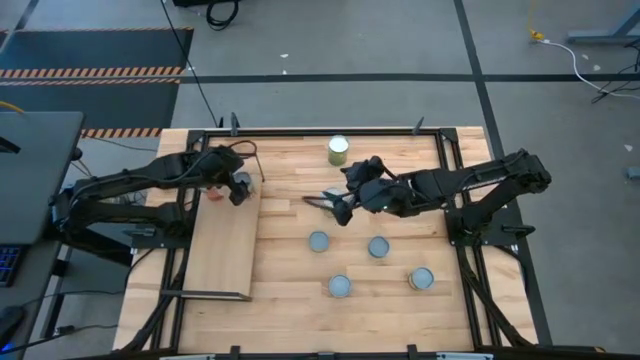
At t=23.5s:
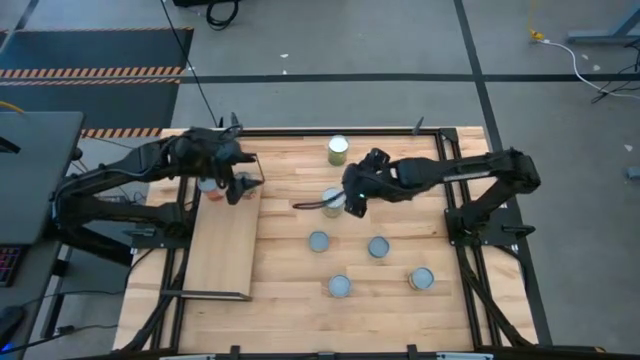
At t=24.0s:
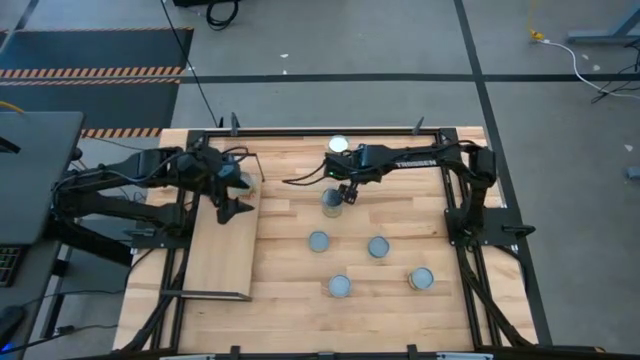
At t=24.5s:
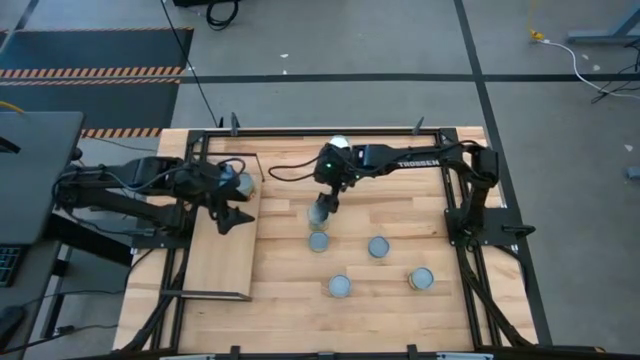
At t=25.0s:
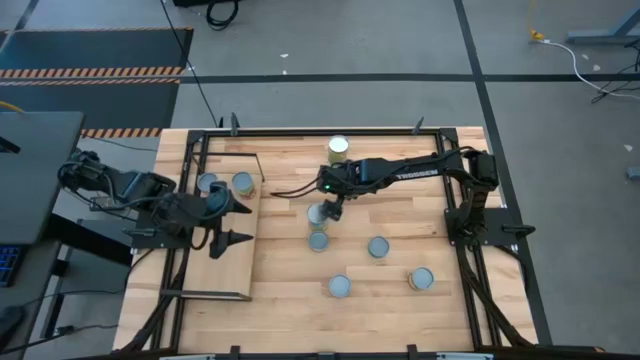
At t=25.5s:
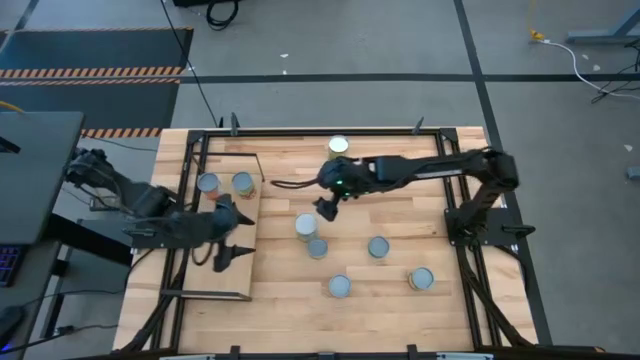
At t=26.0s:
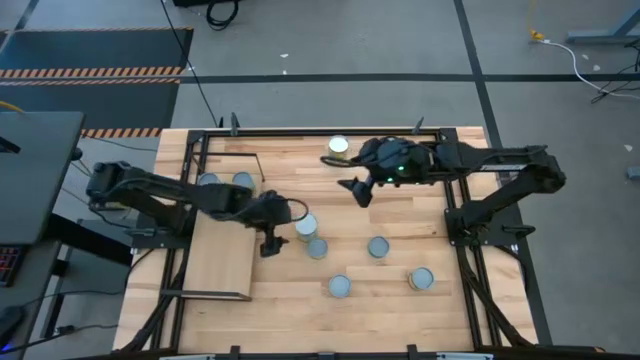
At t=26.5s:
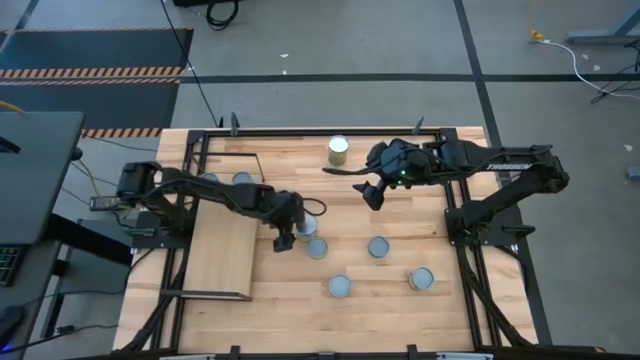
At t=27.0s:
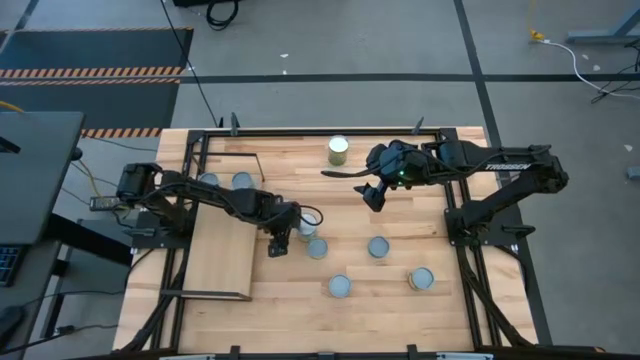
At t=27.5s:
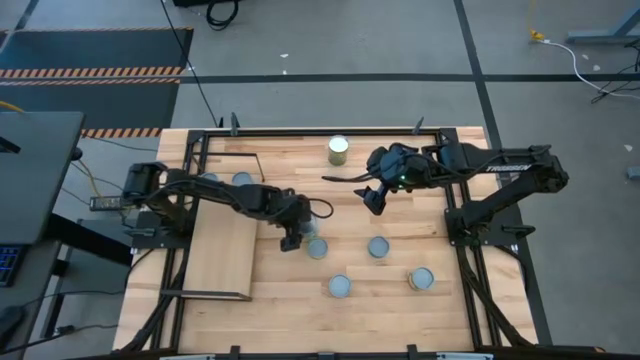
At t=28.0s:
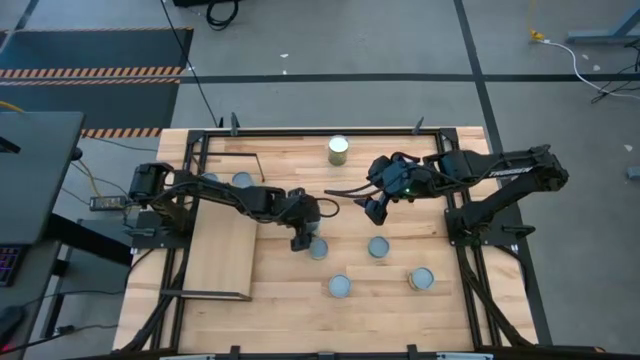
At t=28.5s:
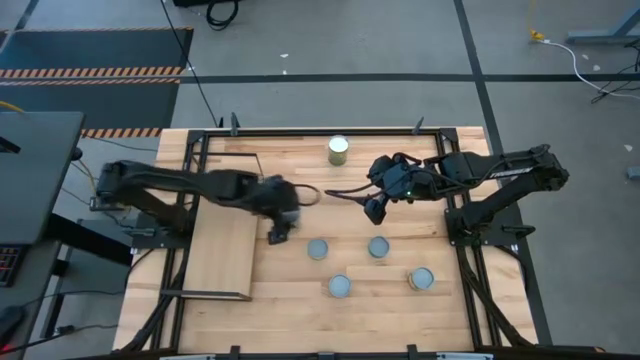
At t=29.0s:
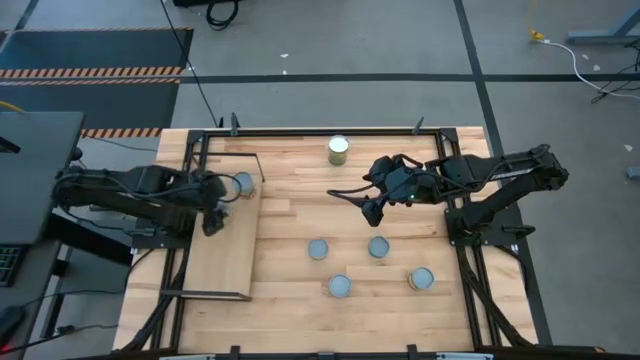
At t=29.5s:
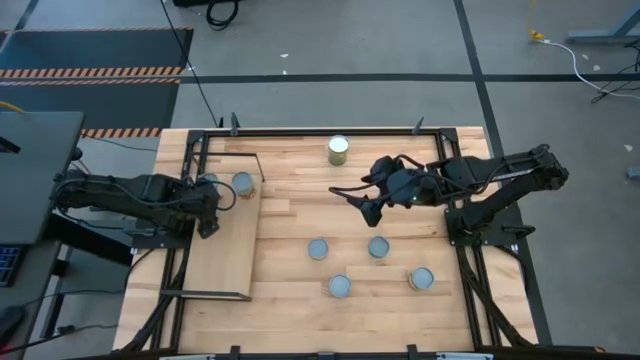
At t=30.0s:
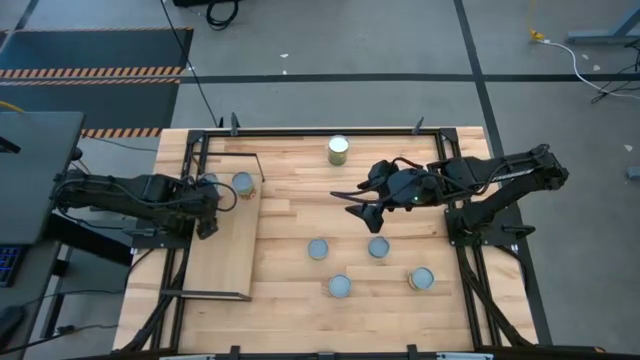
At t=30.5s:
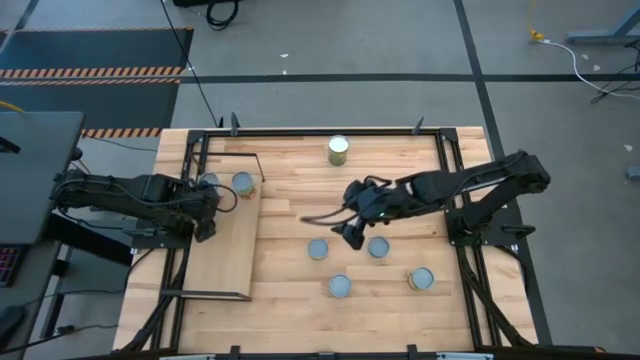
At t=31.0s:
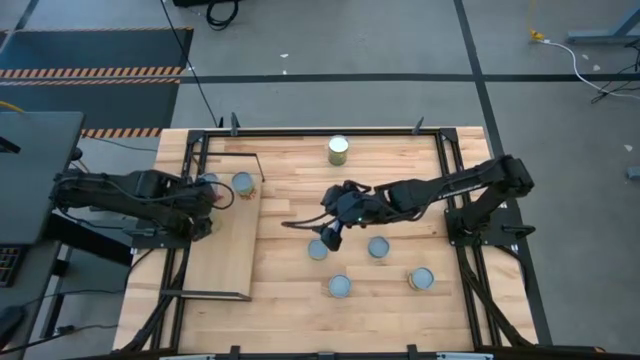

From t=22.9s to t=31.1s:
Task: Pick and place cans onto a shelf
Put the canned carrots on the shelf

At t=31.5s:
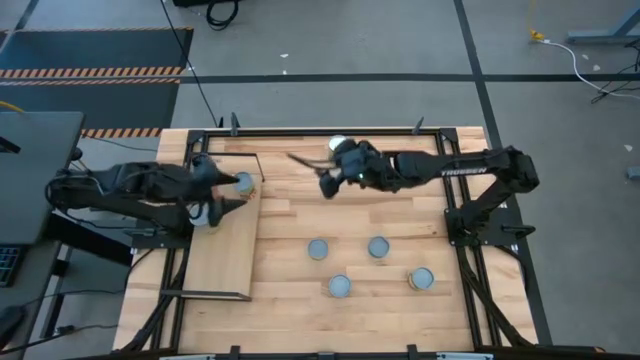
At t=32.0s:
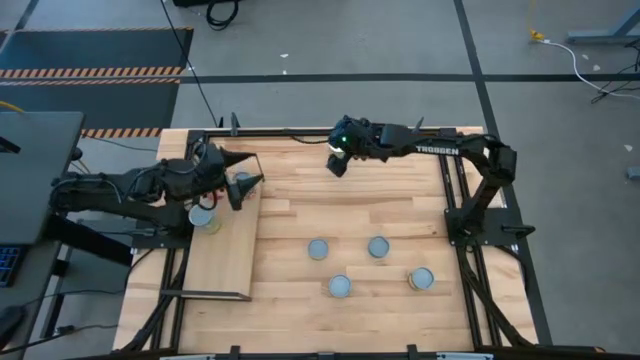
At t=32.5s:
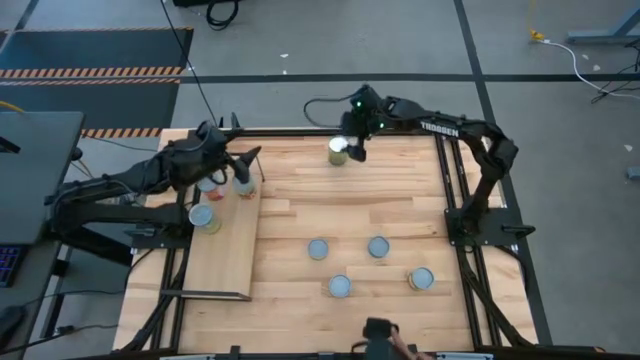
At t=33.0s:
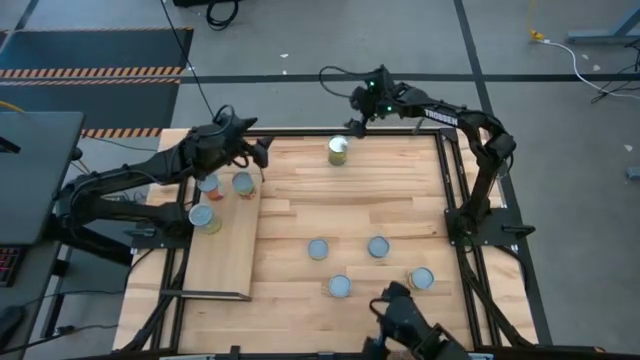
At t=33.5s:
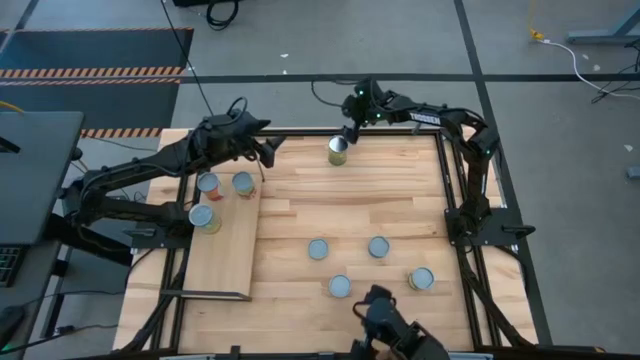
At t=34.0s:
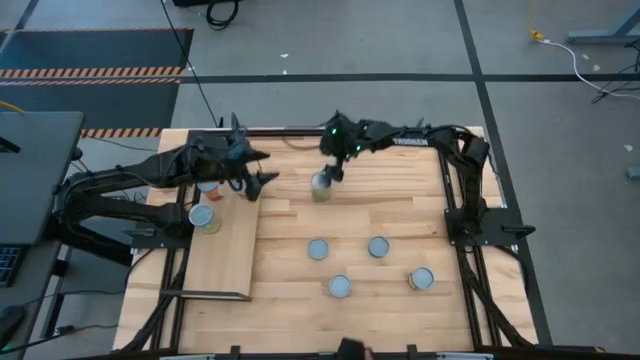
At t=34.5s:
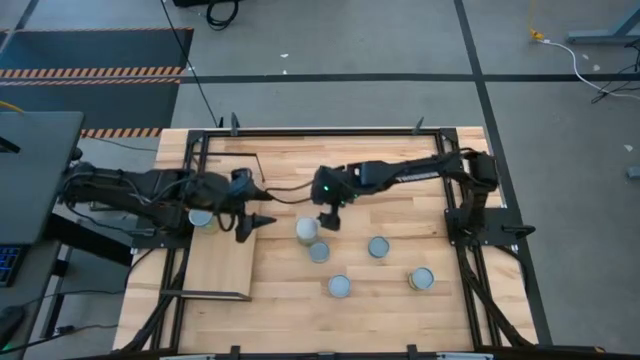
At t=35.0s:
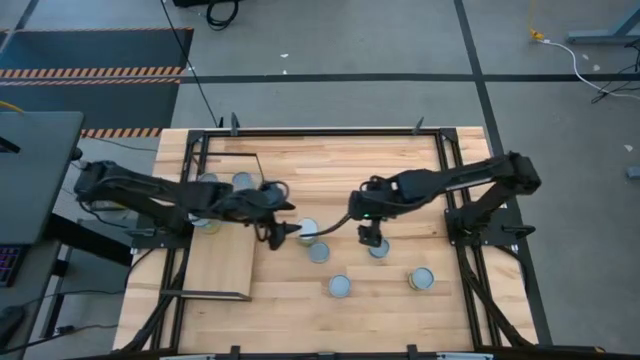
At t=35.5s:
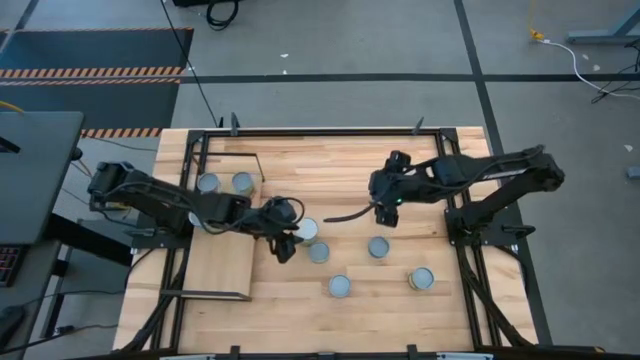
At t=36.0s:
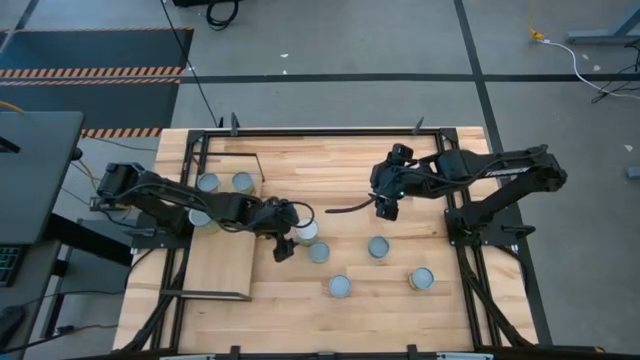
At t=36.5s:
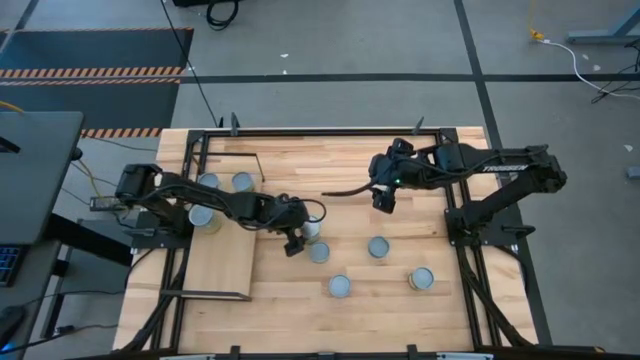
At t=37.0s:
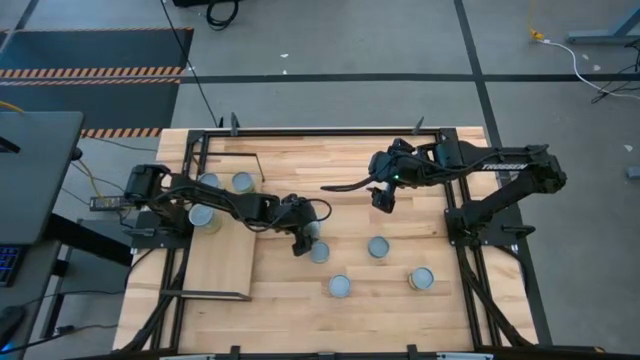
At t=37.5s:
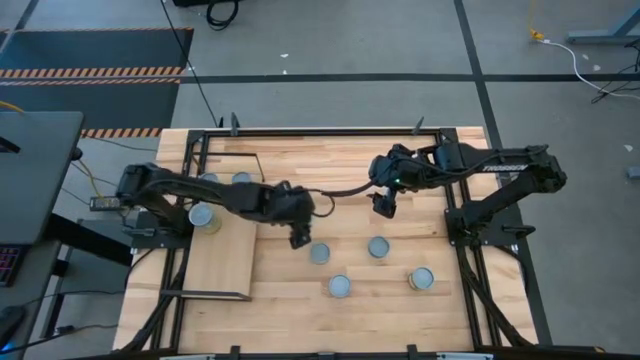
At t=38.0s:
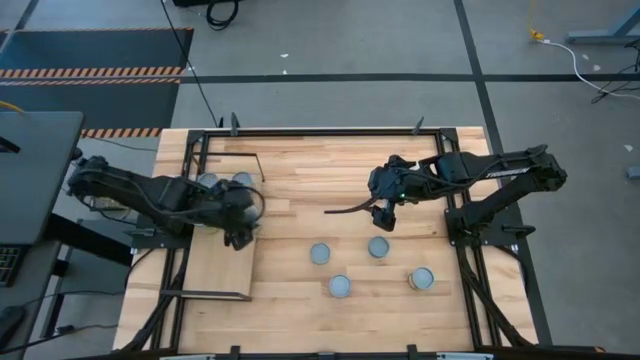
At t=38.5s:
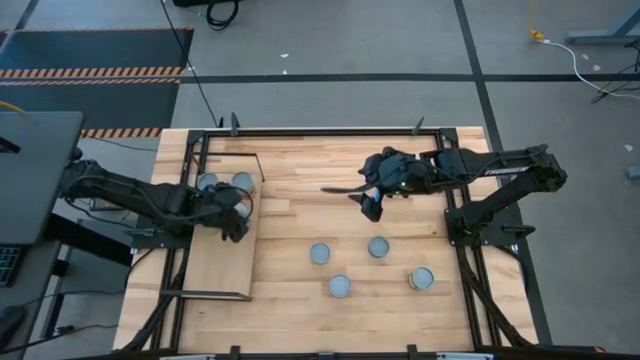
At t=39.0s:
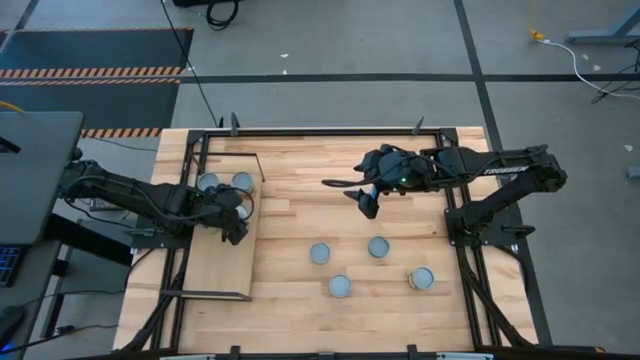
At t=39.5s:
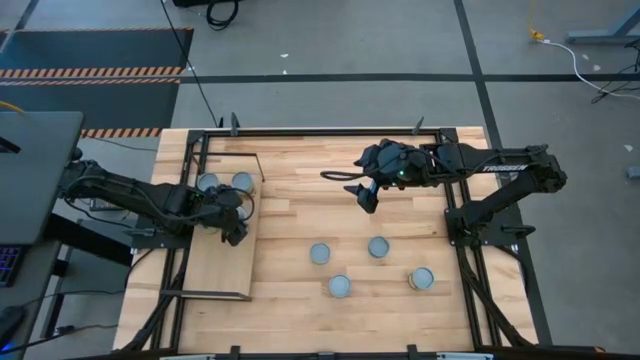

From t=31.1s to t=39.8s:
Put the canned oranges on the shelf

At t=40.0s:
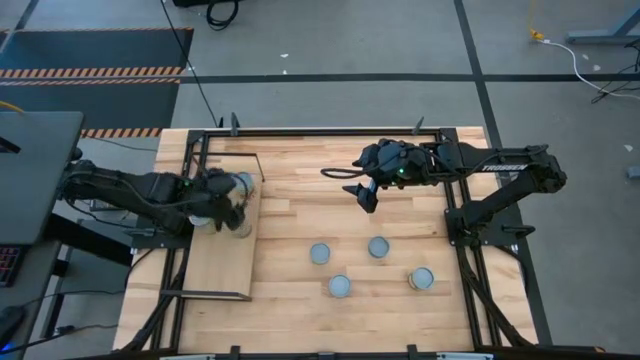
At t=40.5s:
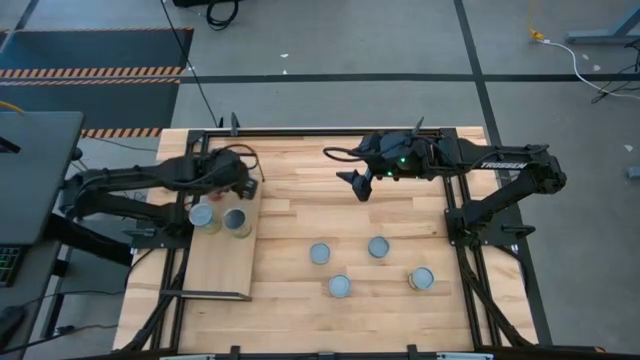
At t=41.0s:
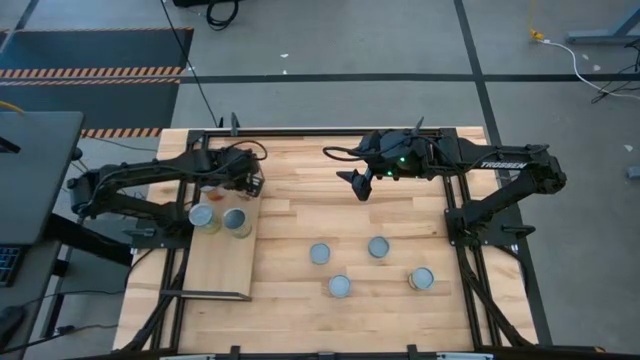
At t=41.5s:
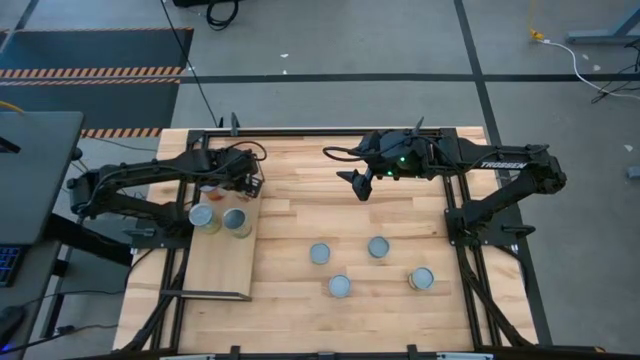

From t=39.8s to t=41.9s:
Adjust the canned spaghetti sauce on the shelf

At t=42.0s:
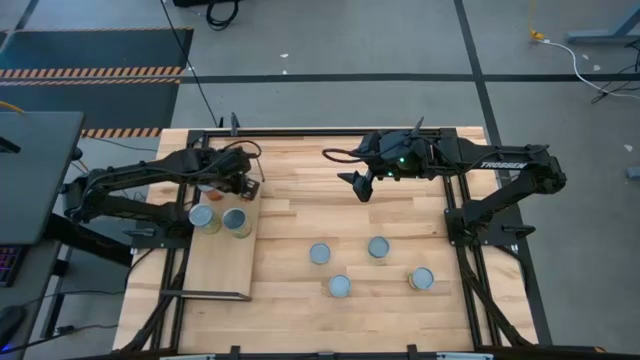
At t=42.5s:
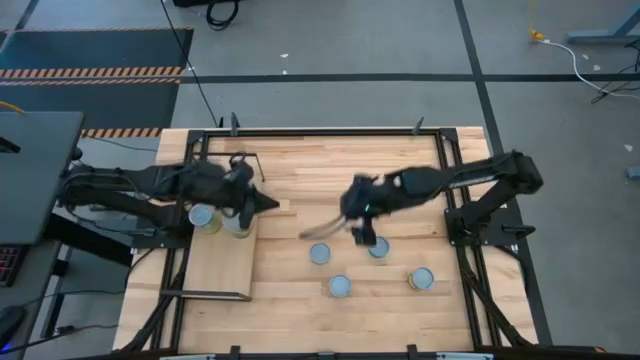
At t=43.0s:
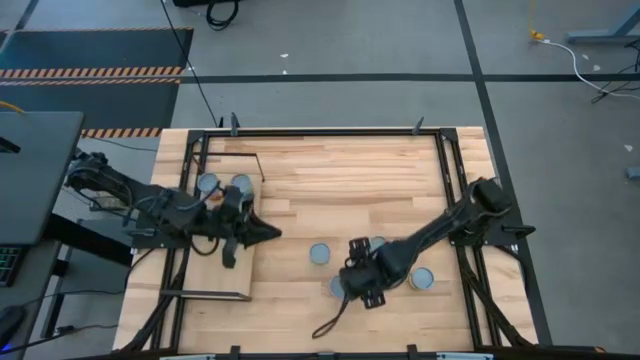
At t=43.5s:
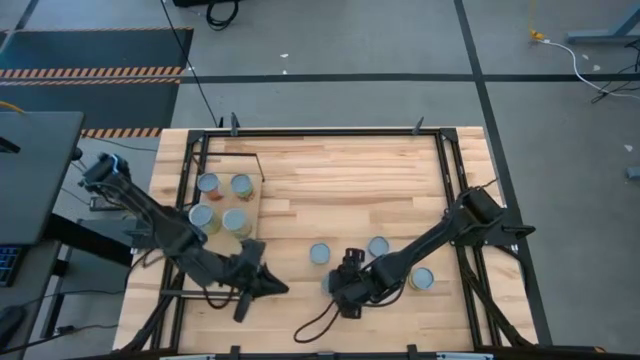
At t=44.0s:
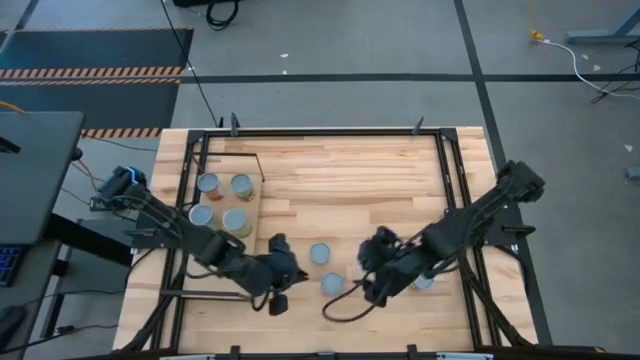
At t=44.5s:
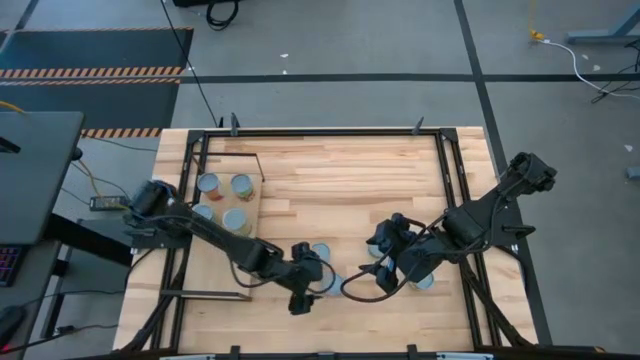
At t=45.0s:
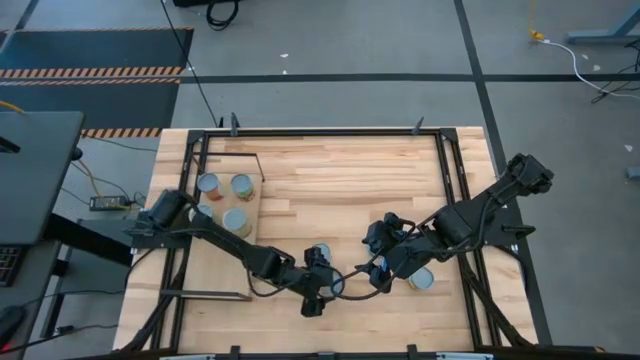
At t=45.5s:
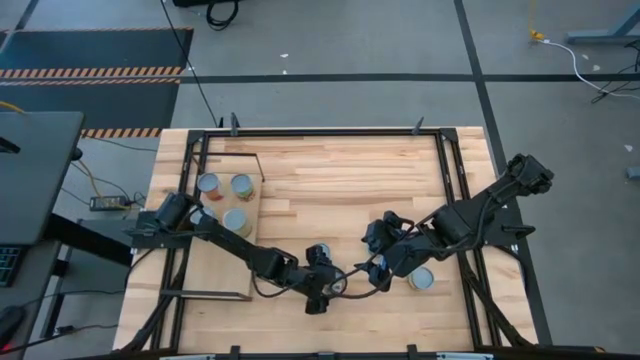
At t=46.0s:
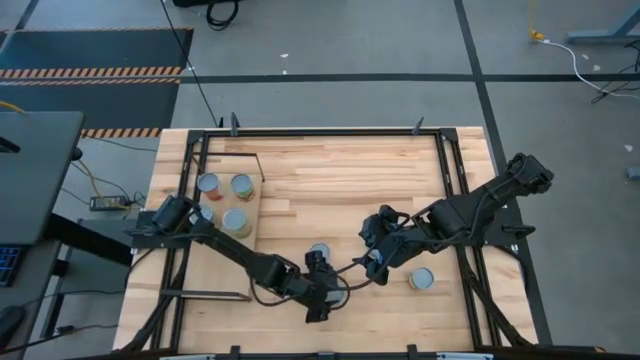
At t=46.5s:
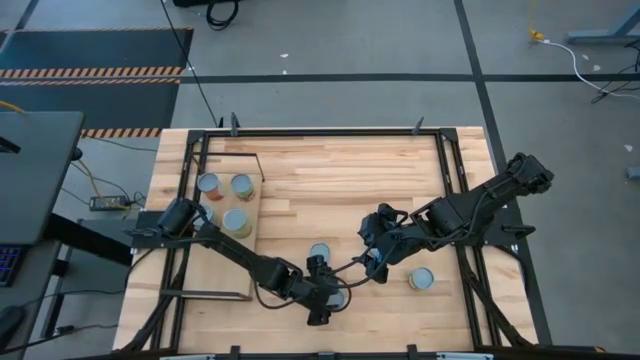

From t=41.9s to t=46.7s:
Put the canned diced tomato on the shelf
